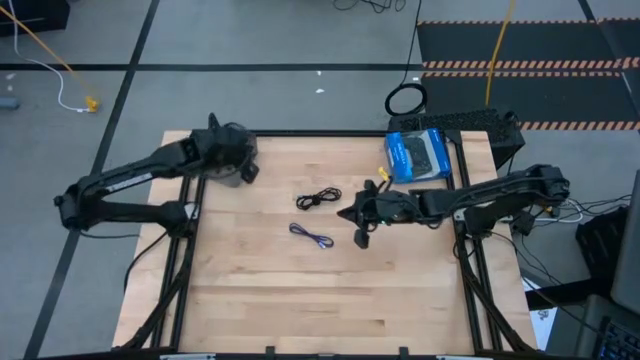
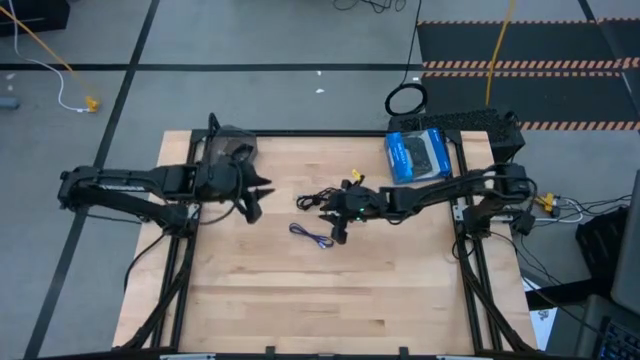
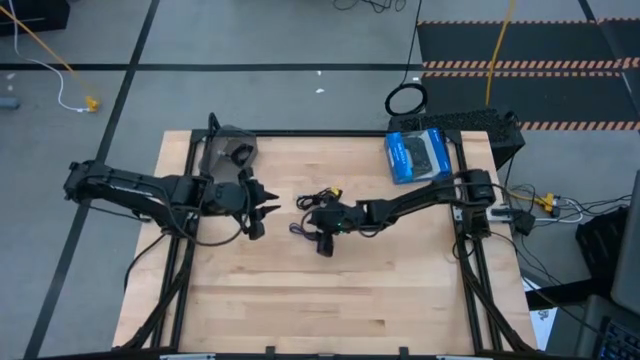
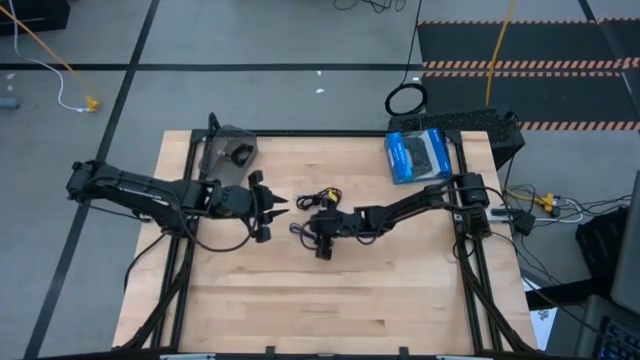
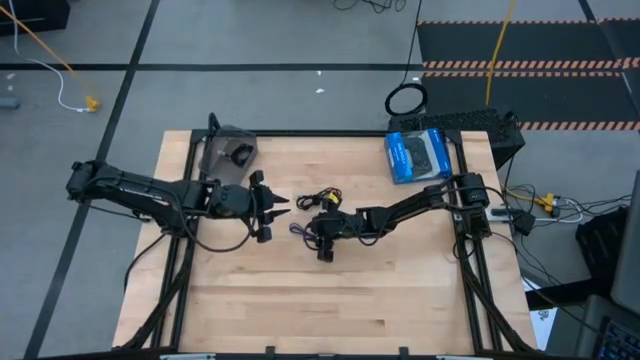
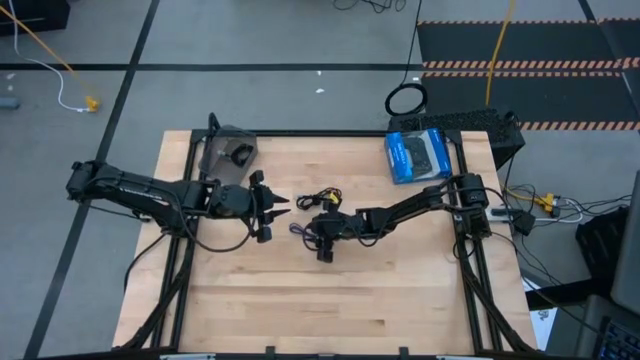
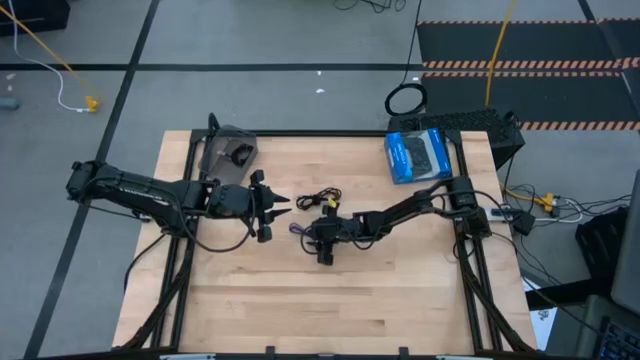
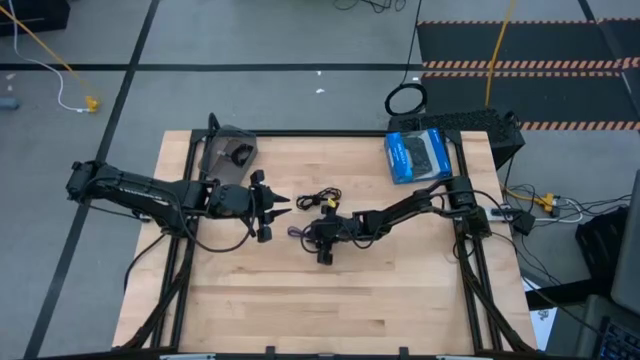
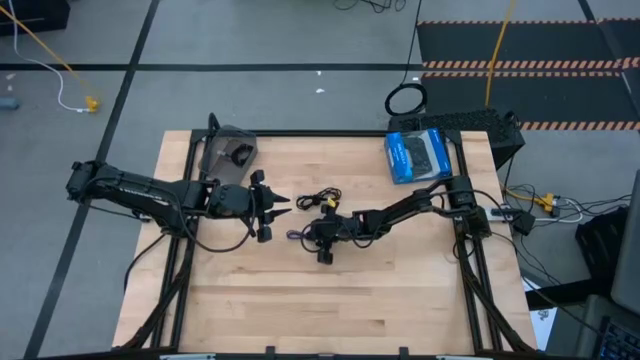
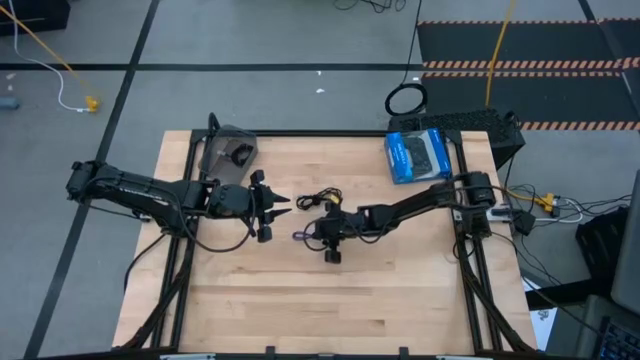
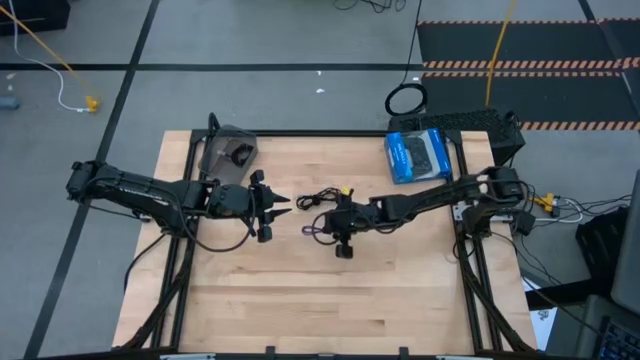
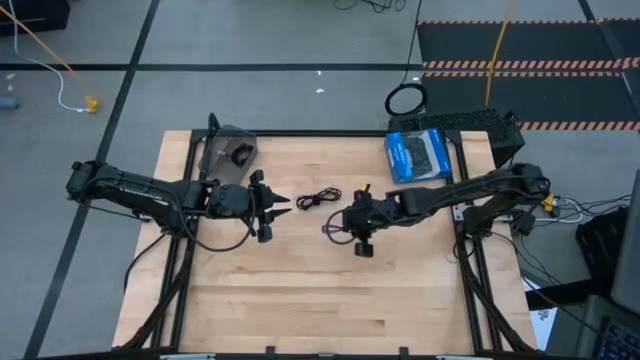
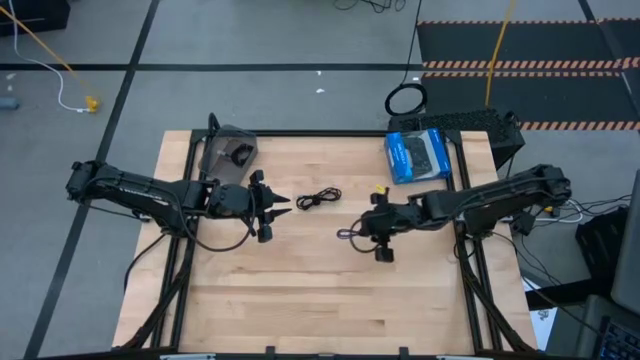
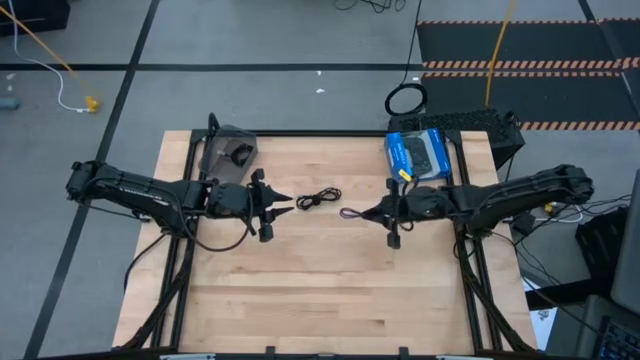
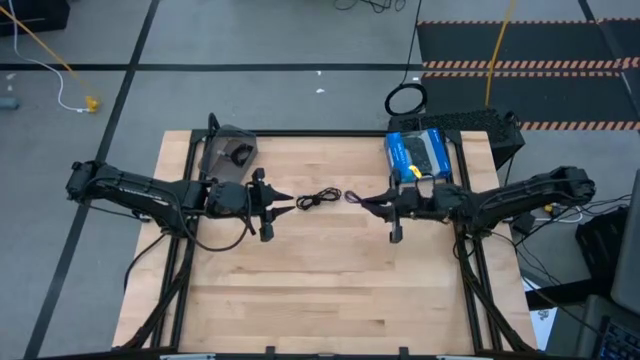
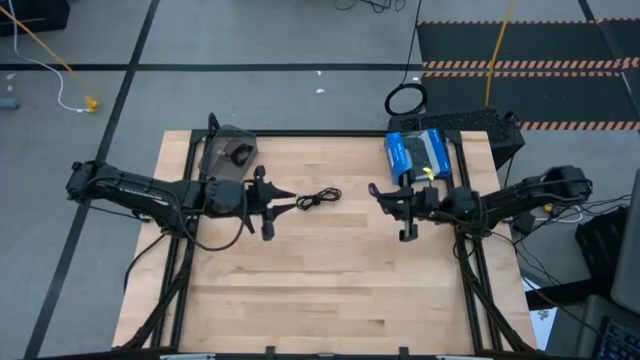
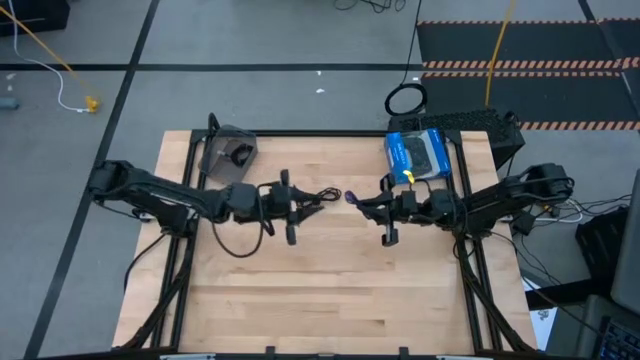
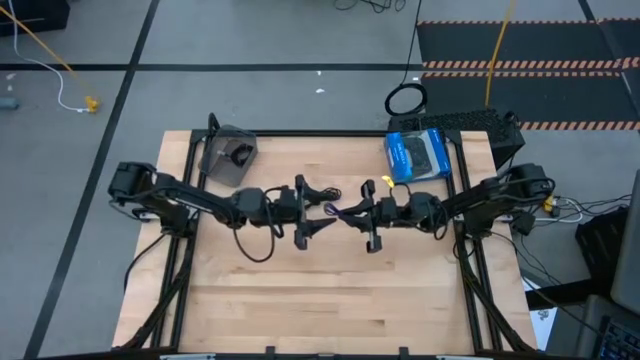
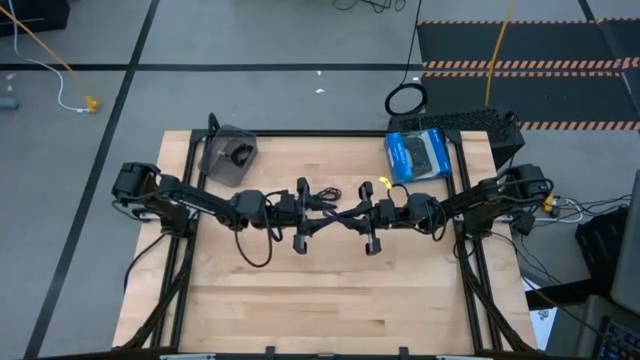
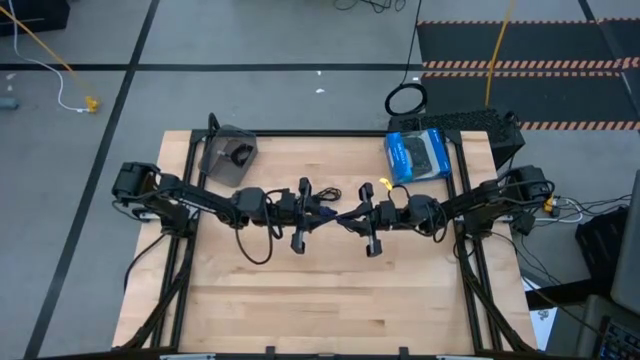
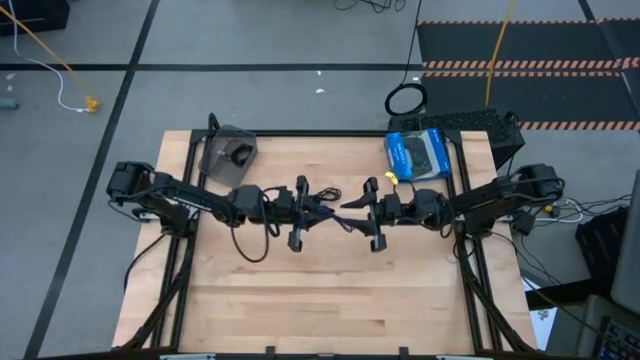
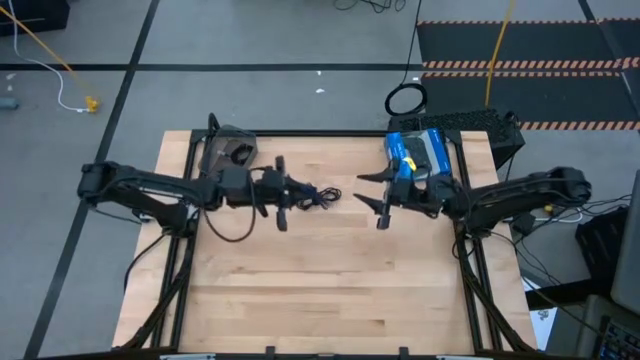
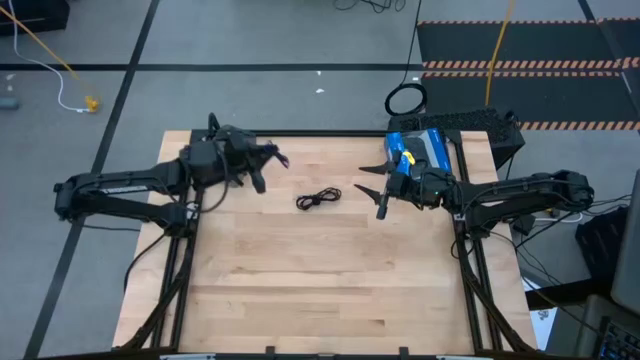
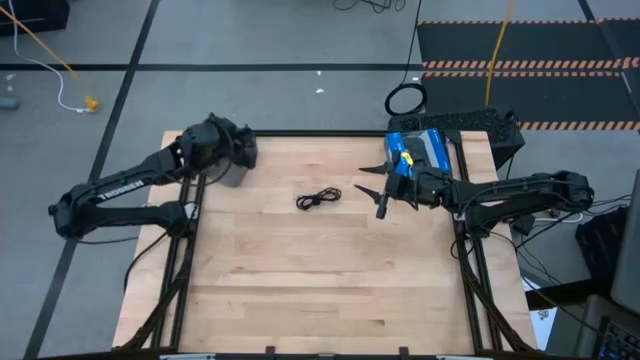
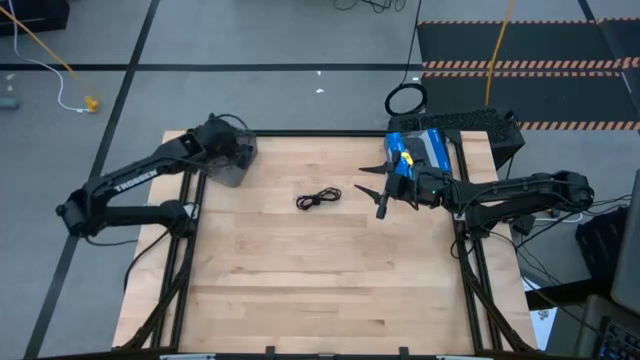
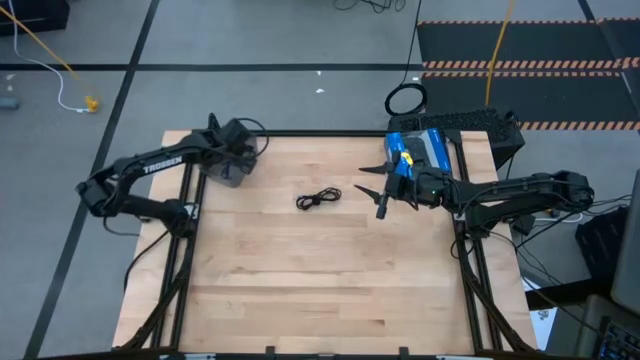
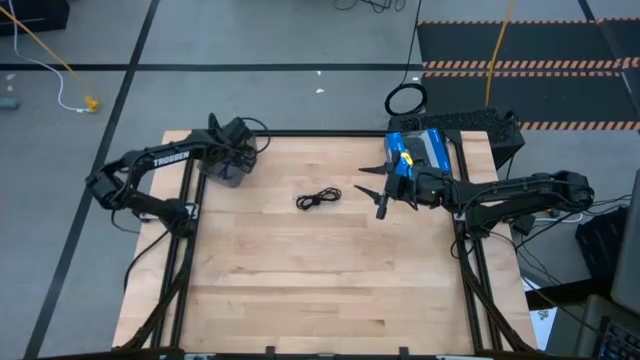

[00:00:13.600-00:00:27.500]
Task: Pick and place USB-C Cables
Put the violet USB cable in the black bin

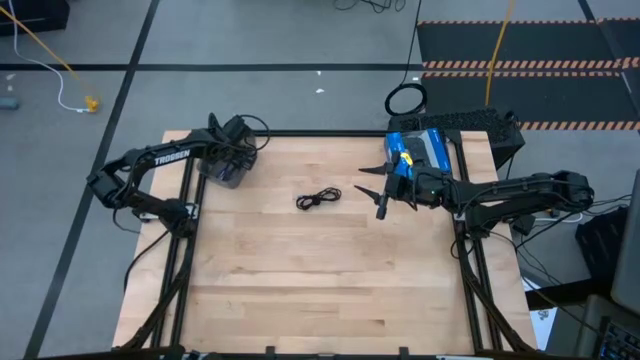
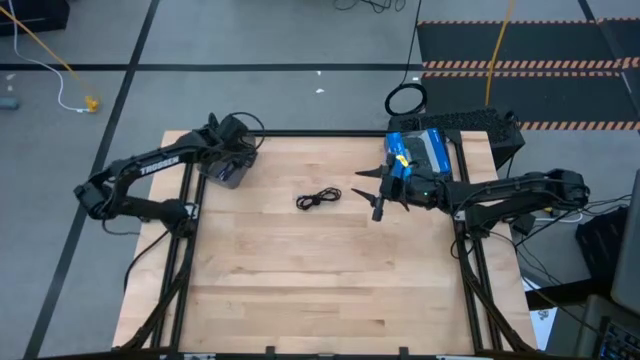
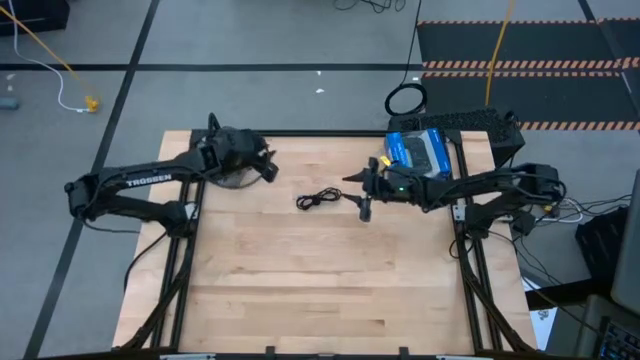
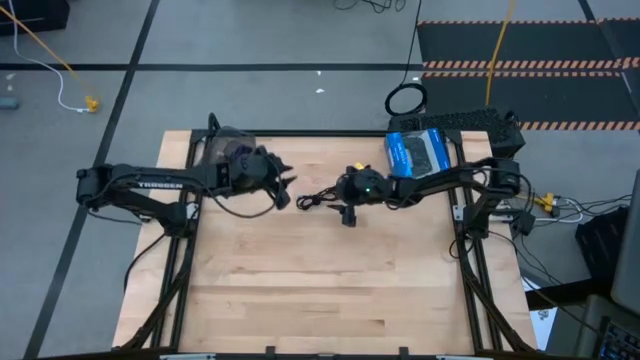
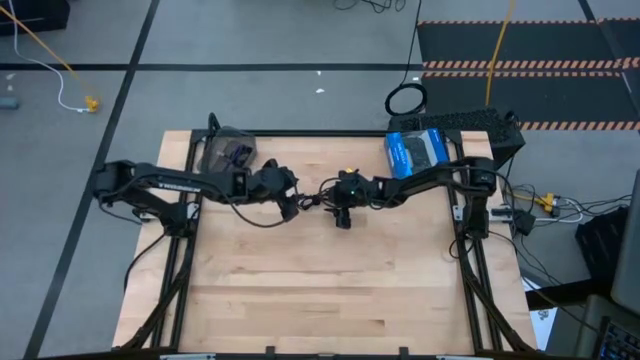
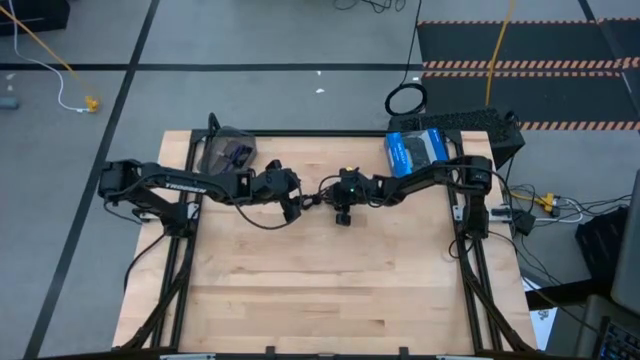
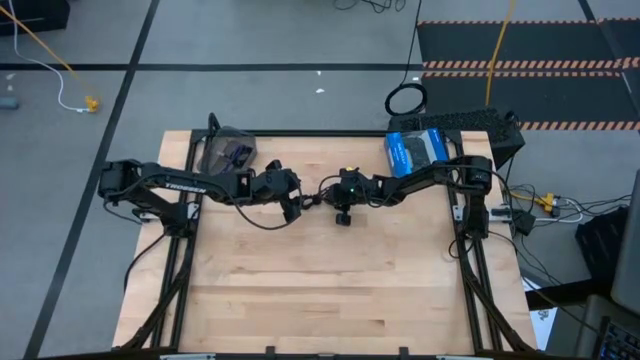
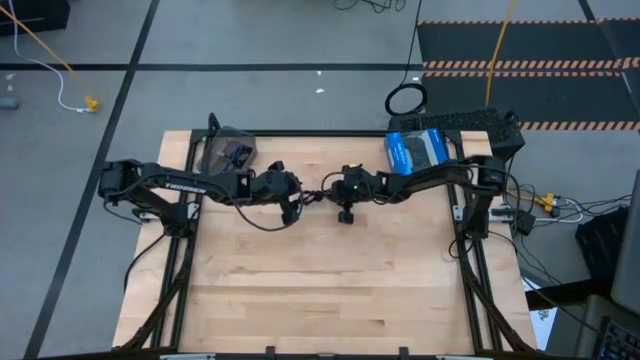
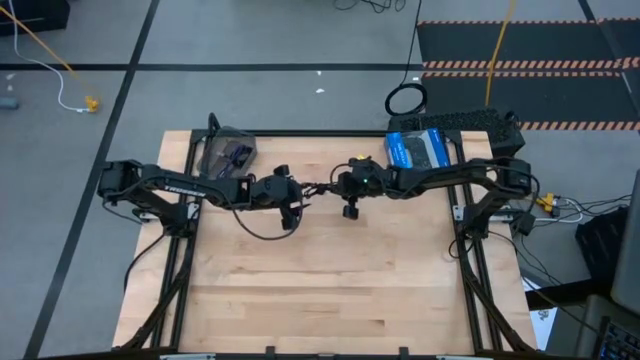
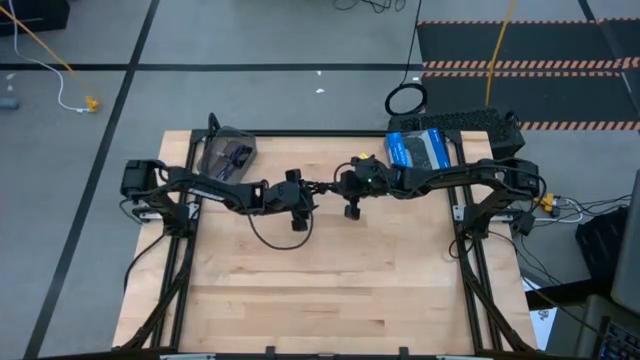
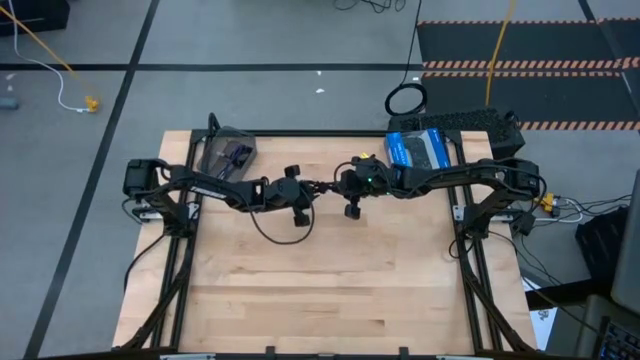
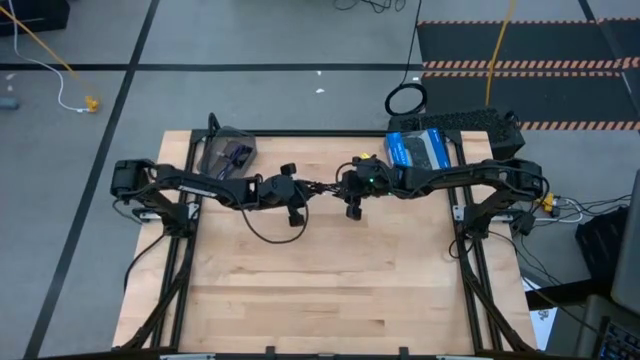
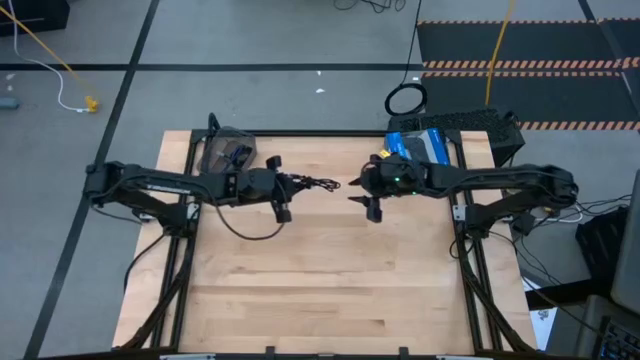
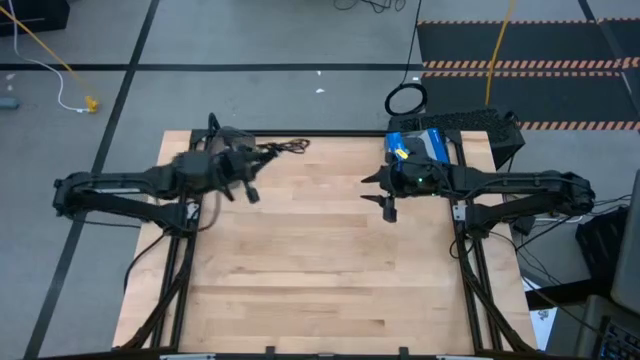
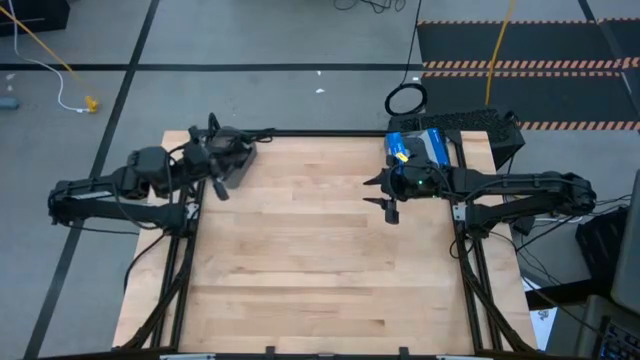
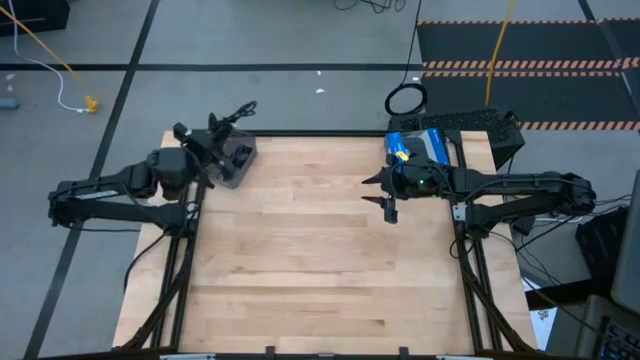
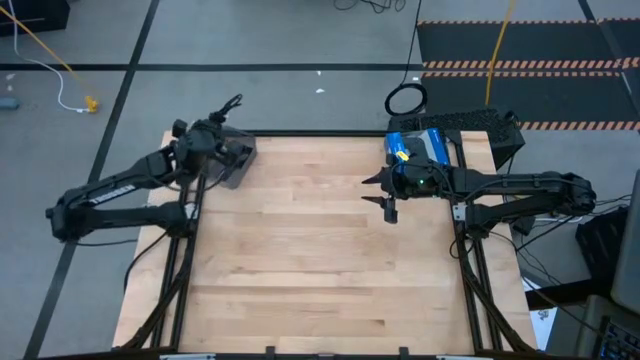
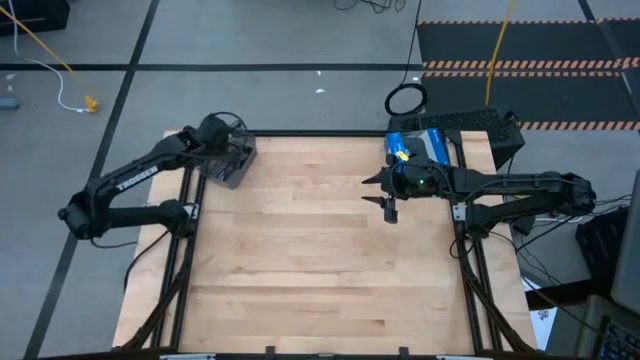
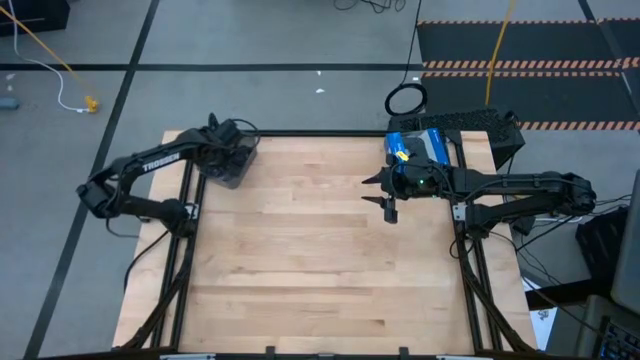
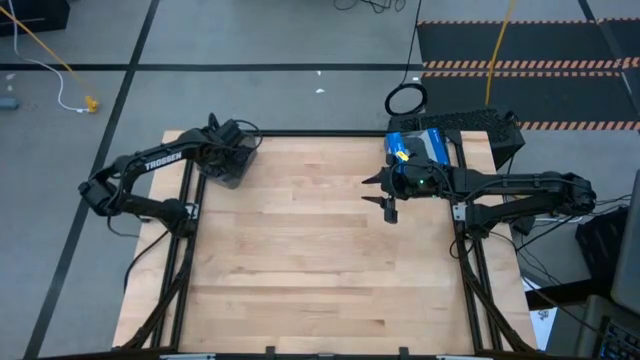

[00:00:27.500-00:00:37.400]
Put the black USB cable in the black bin
